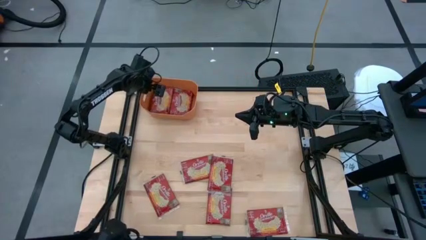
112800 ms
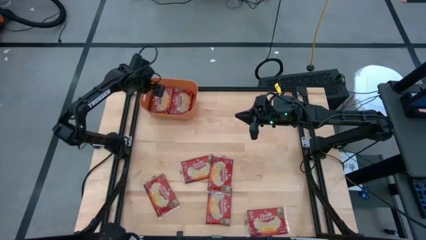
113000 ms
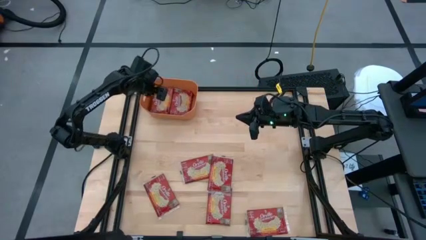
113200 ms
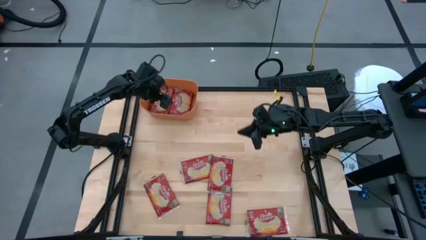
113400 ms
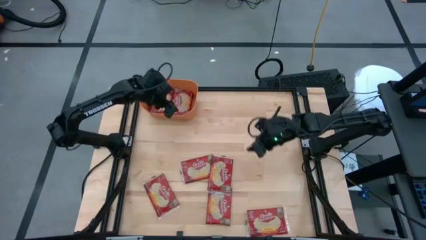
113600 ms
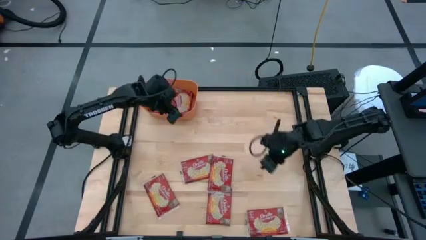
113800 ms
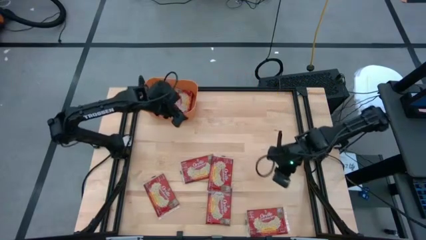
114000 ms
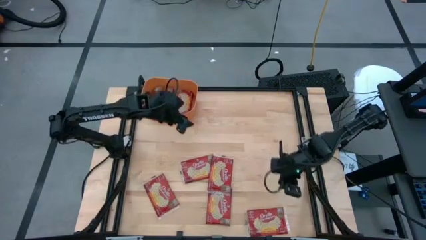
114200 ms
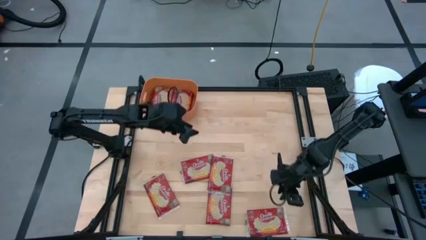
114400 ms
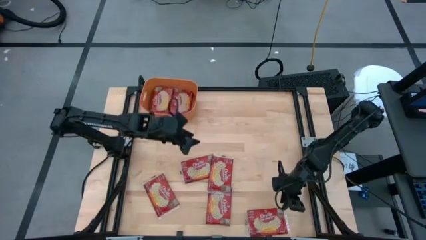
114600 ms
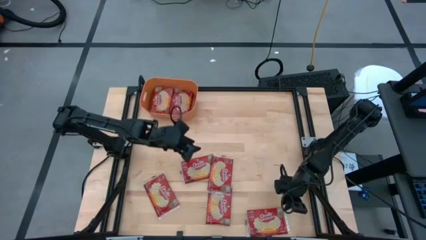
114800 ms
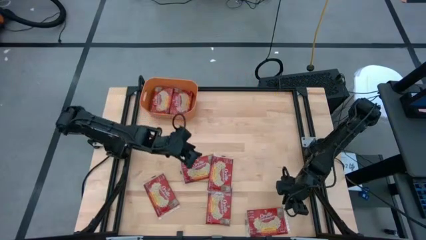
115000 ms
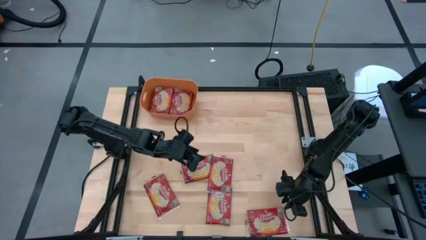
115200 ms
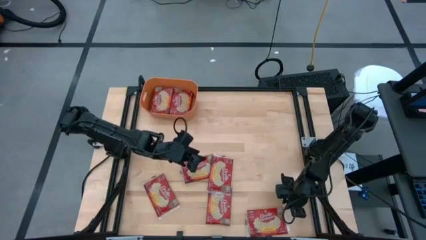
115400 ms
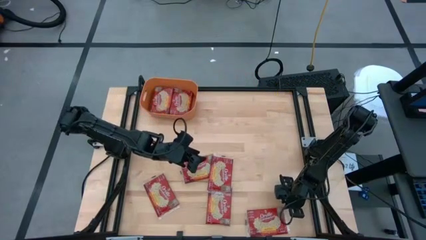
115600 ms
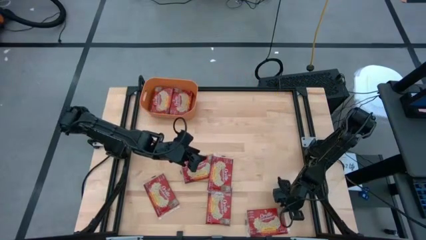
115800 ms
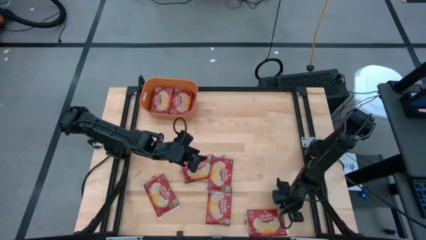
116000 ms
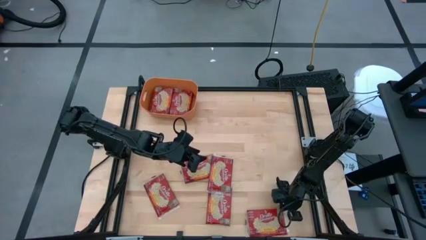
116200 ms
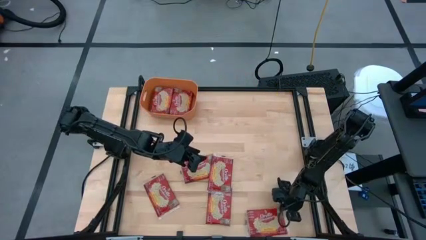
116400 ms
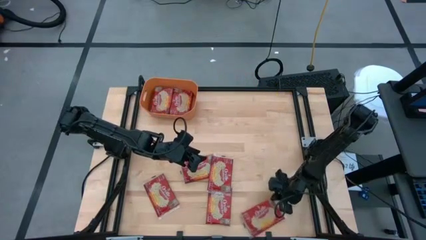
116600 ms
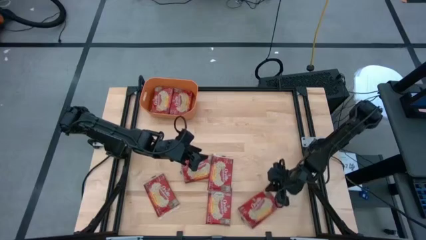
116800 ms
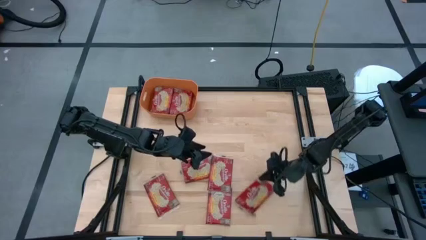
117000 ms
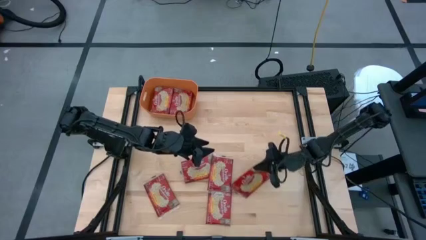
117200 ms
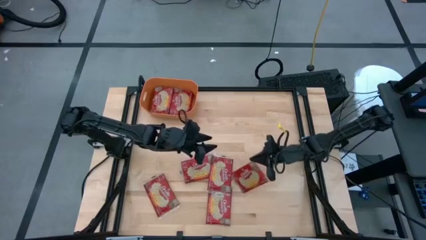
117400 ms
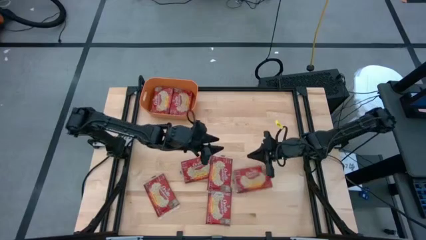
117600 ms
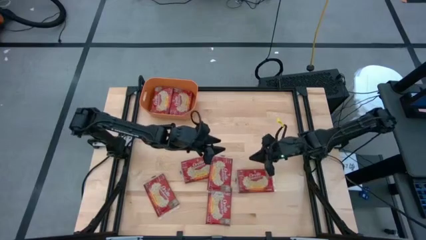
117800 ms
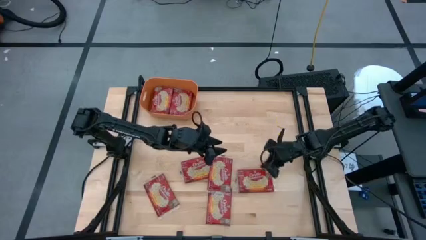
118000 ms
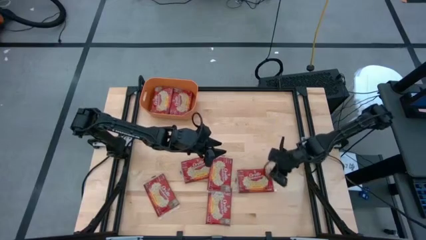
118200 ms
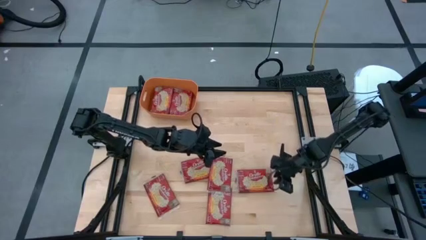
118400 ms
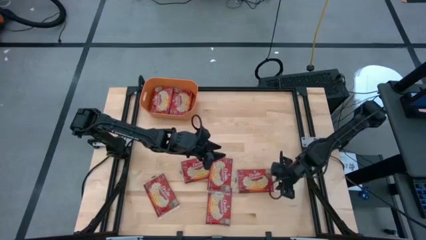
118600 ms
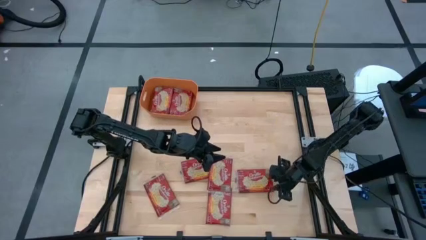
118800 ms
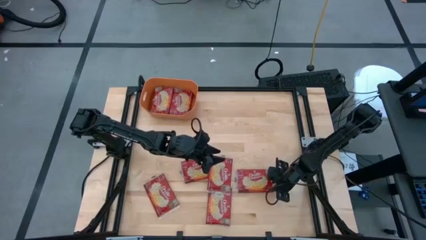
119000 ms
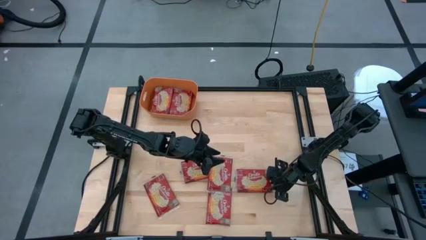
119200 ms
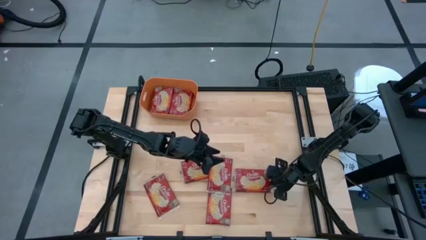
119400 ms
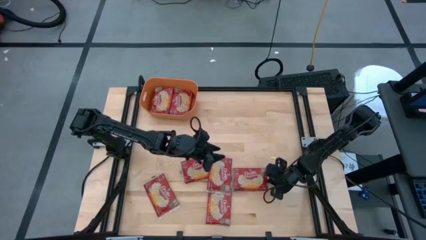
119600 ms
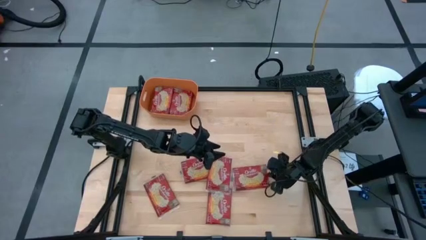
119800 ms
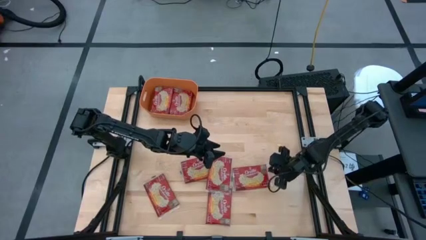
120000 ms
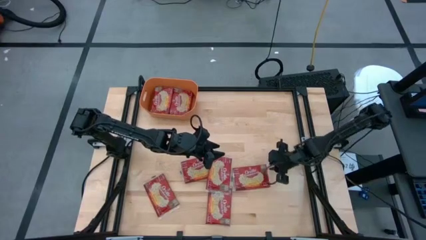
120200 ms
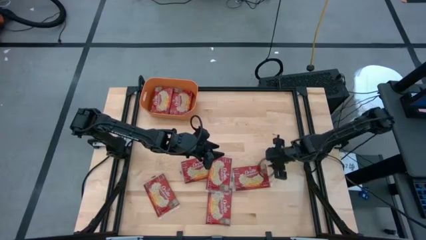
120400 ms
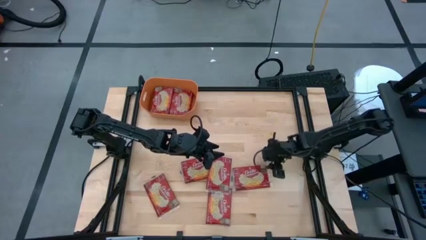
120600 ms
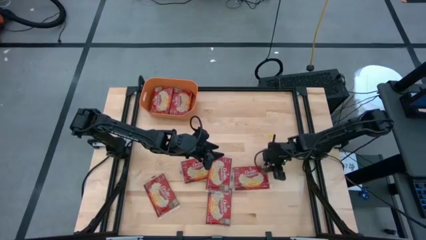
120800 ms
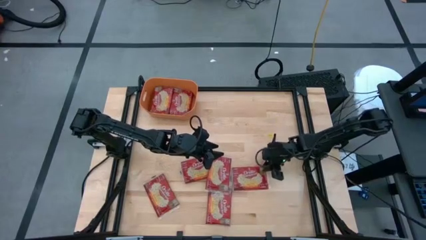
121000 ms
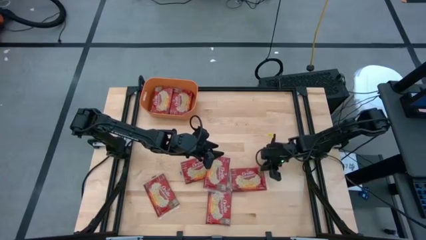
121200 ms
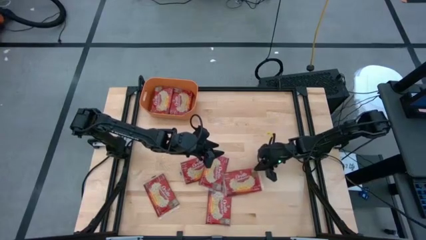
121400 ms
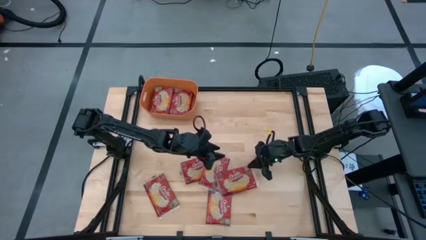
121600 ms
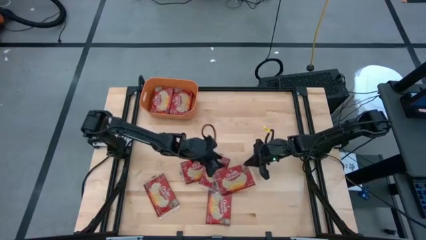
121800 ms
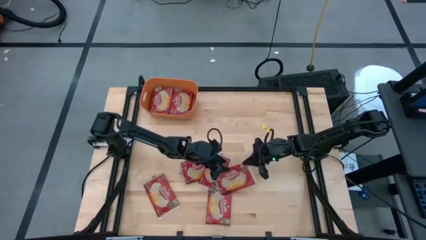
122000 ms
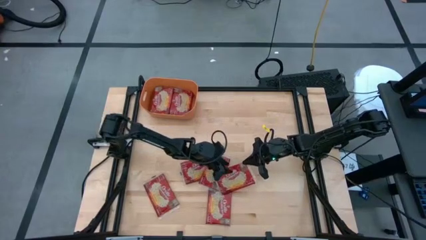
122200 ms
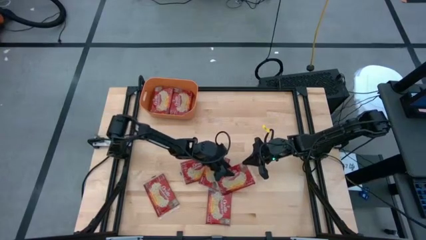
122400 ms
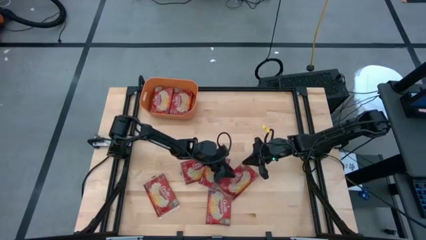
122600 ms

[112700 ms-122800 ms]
Task: Sort popcorn bags into baskets
Stack the red popcorn bag on top of the red popcorn bag in the orange bin
